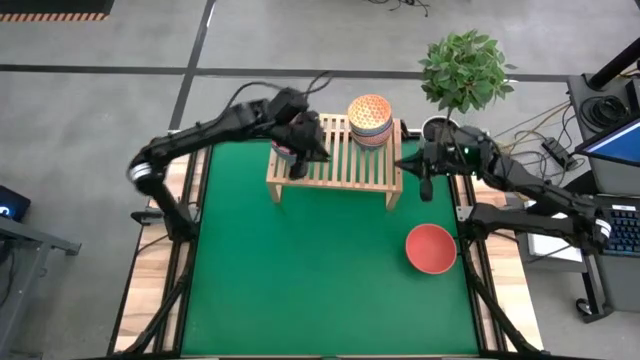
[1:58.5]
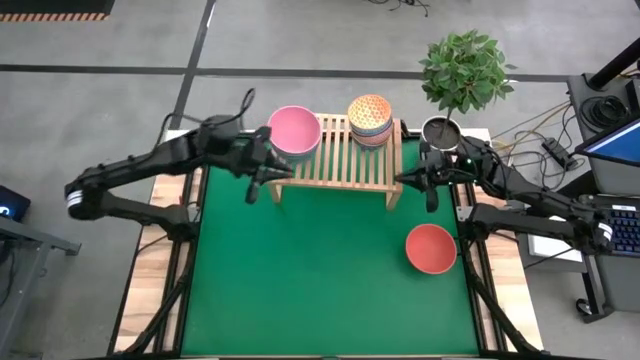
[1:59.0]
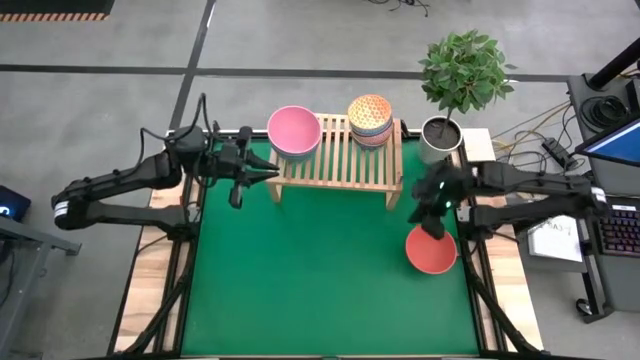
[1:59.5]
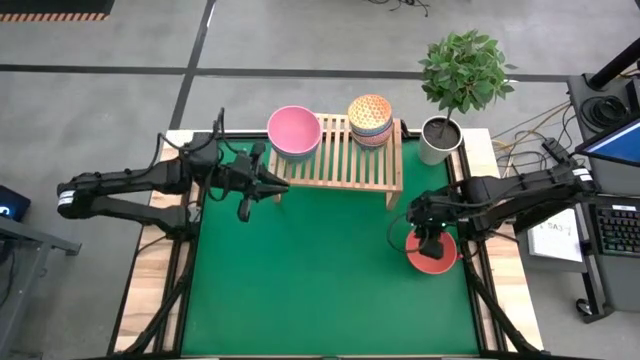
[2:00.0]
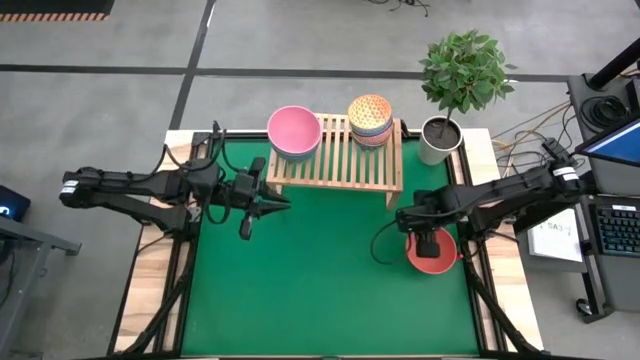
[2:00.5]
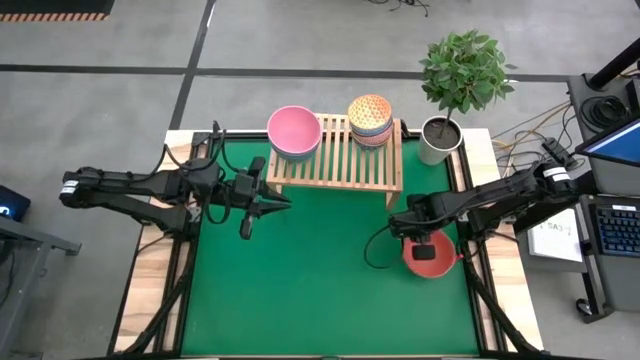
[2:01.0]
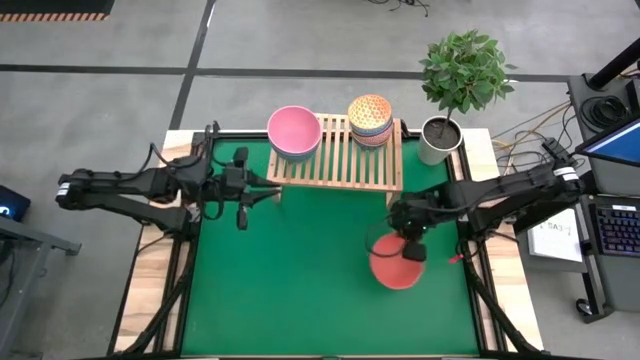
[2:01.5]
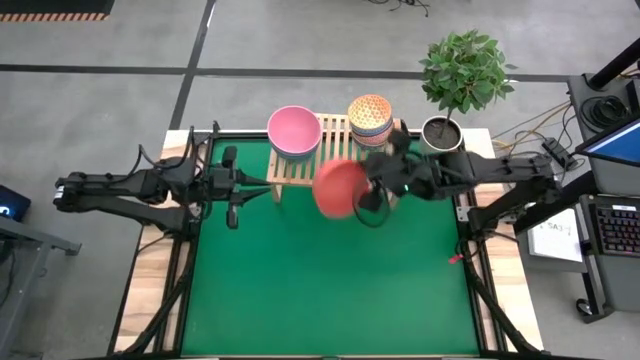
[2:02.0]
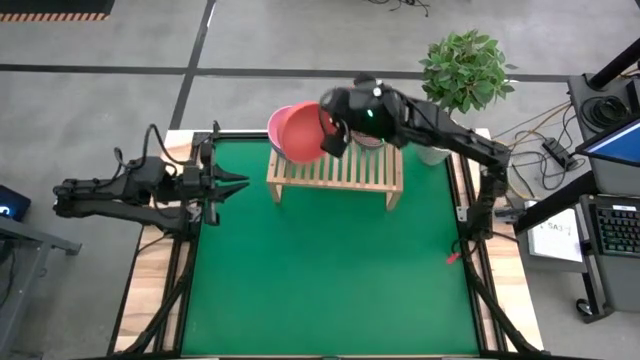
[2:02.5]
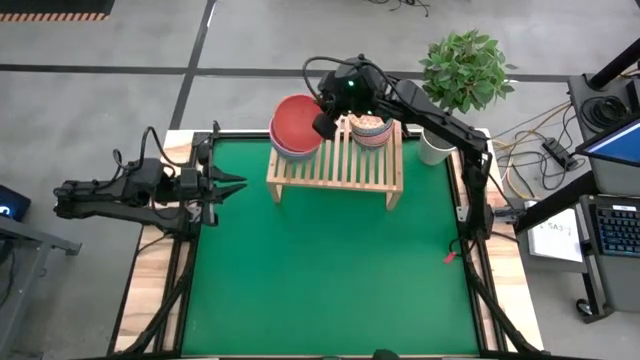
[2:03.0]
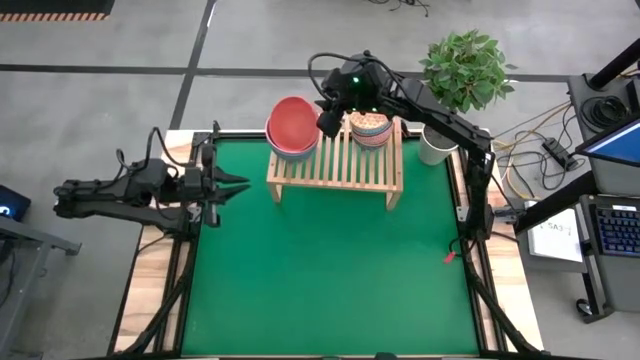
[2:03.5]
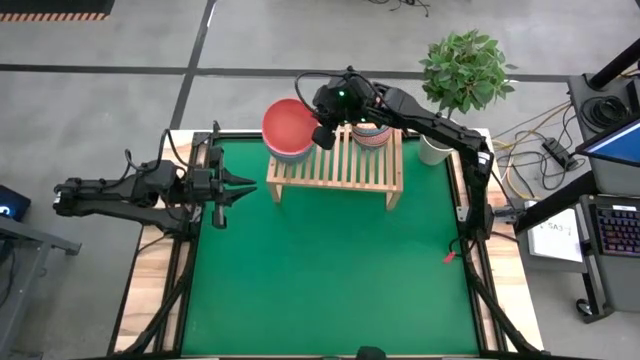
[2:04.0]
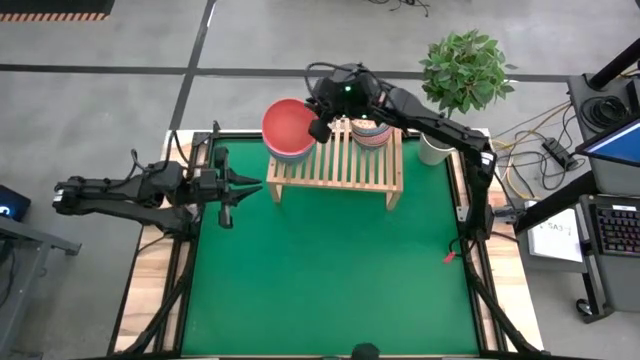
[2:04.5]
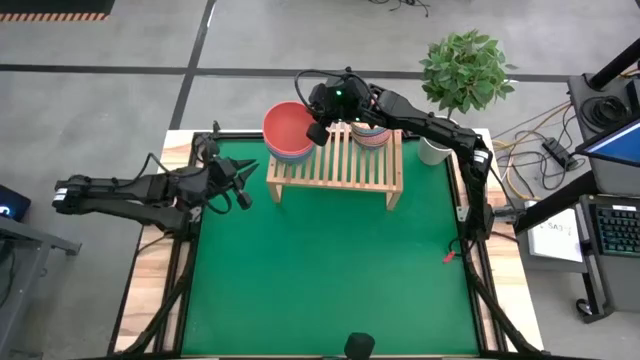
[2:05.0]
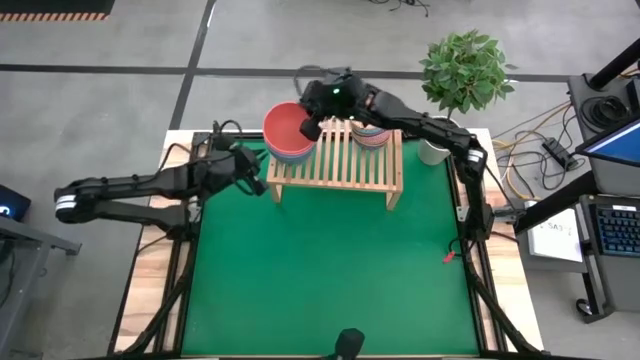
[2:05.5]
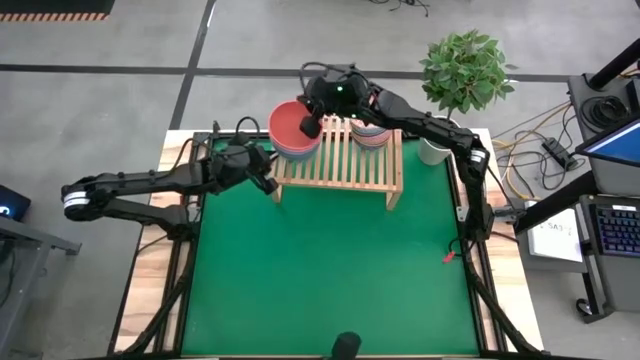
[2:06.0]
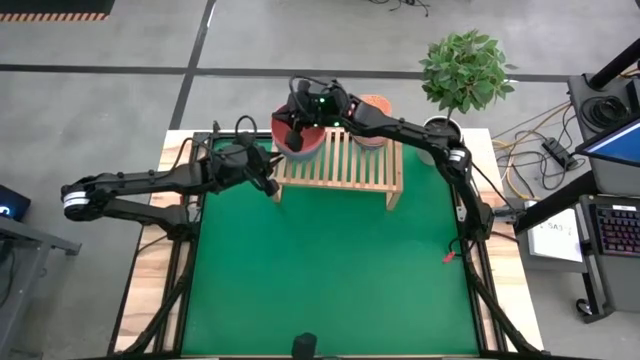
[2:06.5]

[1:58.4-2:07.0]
Task: Place and stack bowls onto a shelf
Stack the orange bowl on top of the pink bowl on the shelf

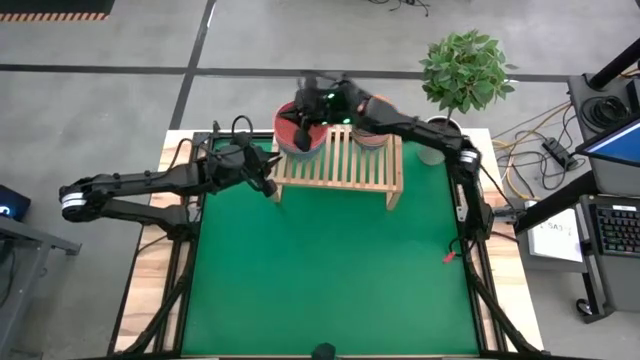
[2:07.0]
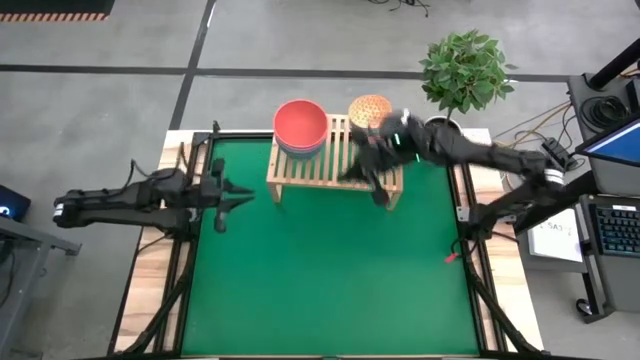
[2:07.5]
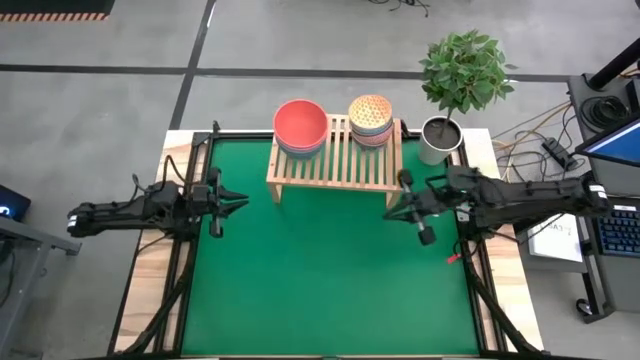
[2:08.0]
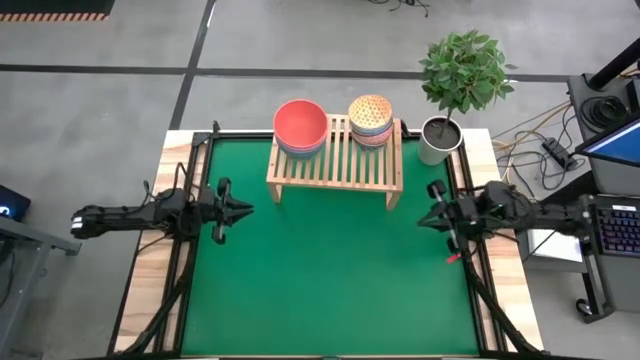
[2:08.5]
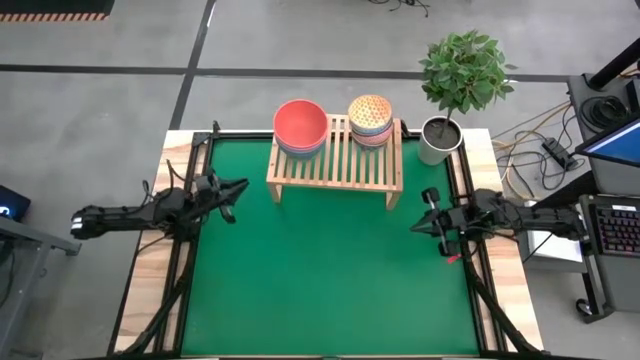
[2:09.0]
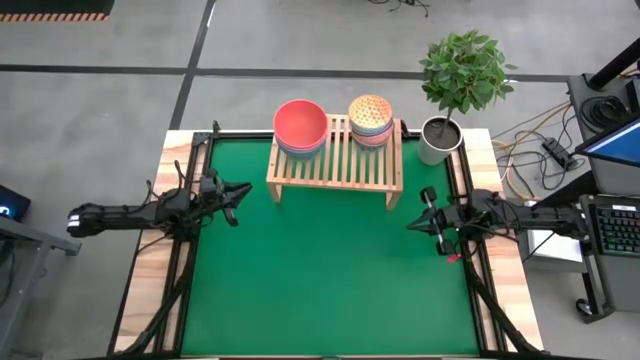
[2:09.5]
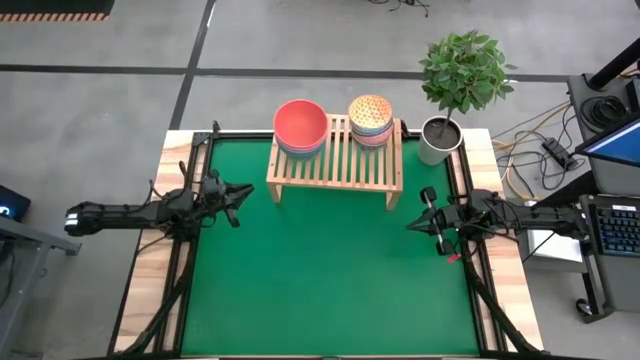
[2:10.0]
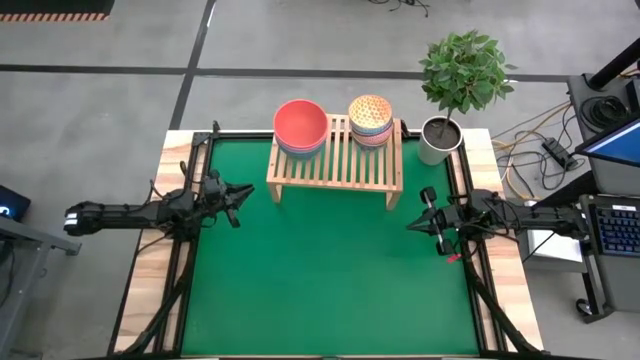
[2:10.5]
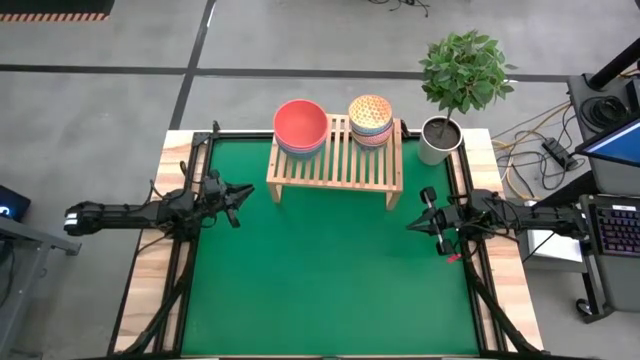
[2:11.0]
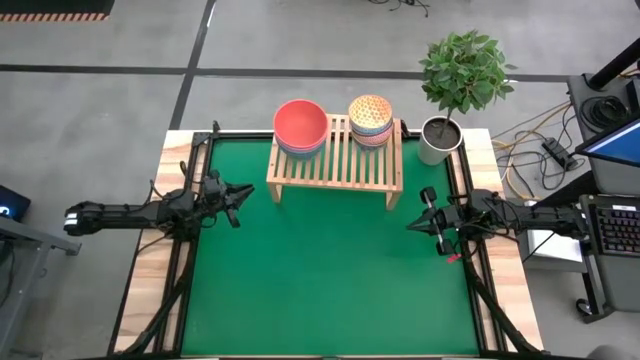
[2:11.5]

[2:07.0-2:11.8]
Return to Home Position

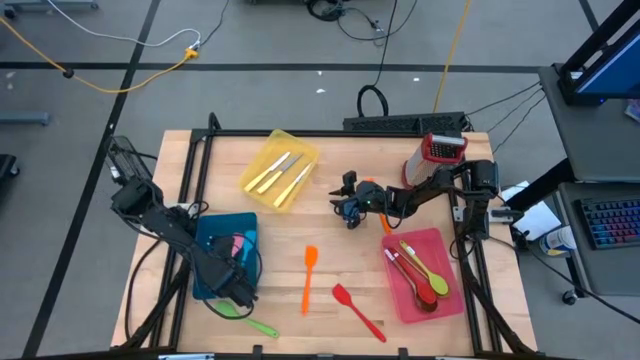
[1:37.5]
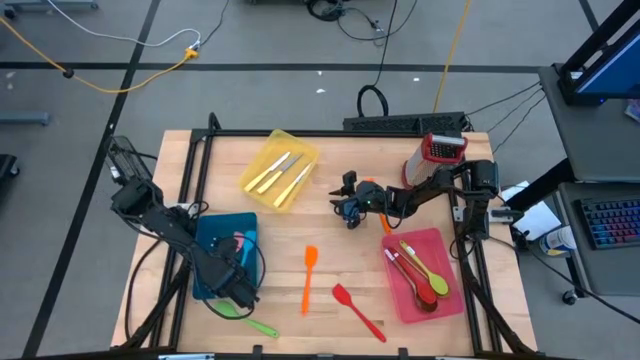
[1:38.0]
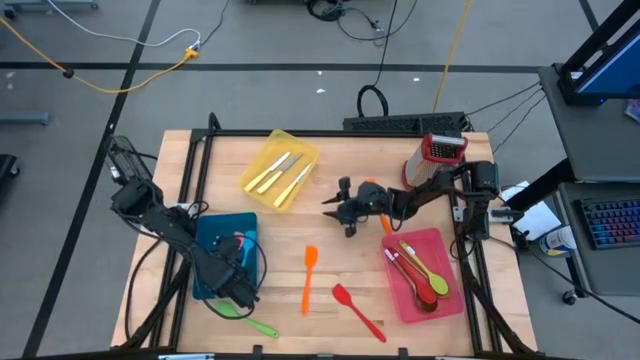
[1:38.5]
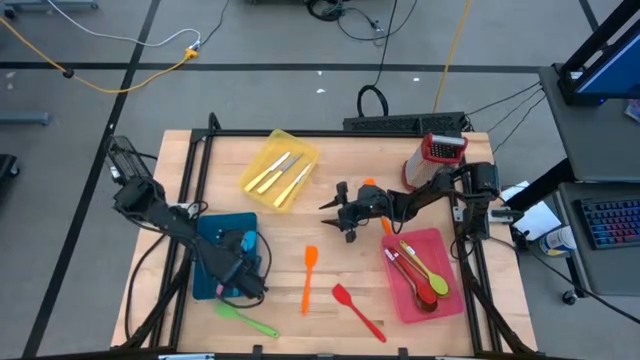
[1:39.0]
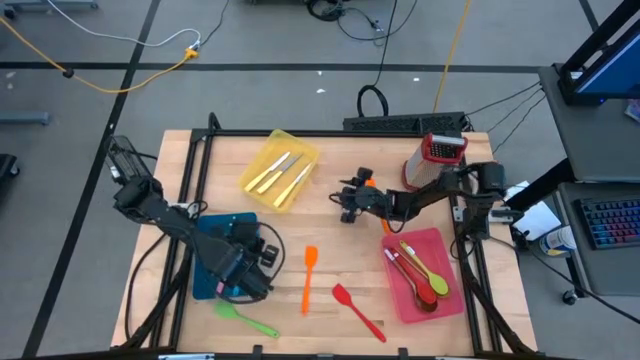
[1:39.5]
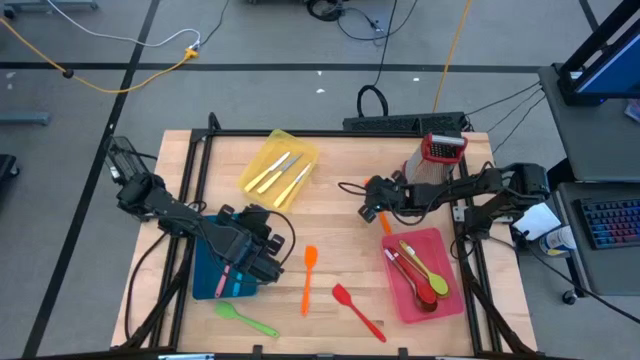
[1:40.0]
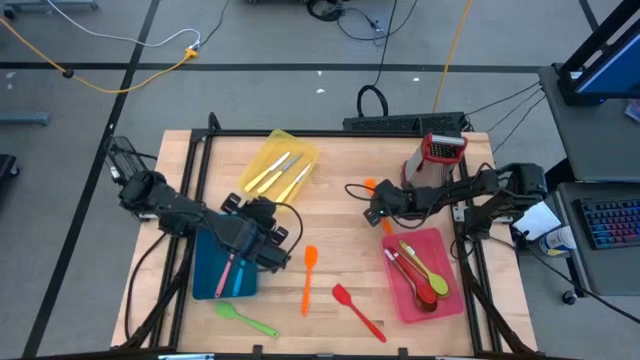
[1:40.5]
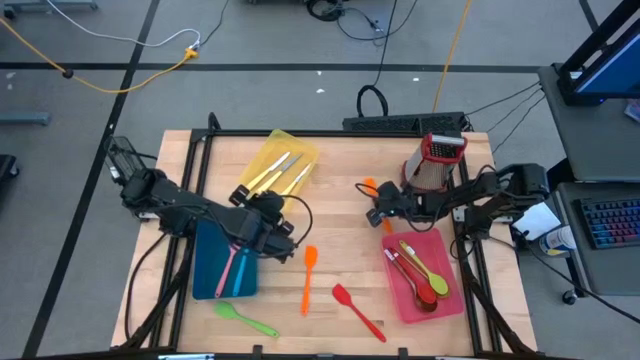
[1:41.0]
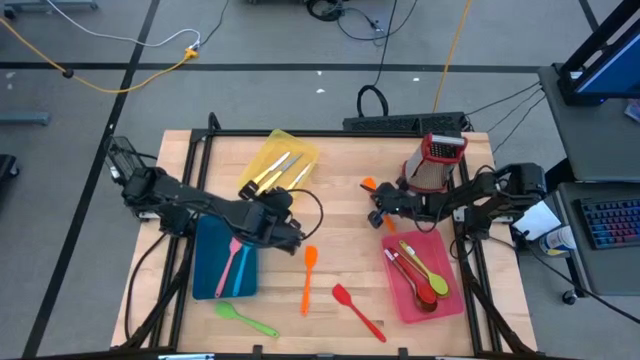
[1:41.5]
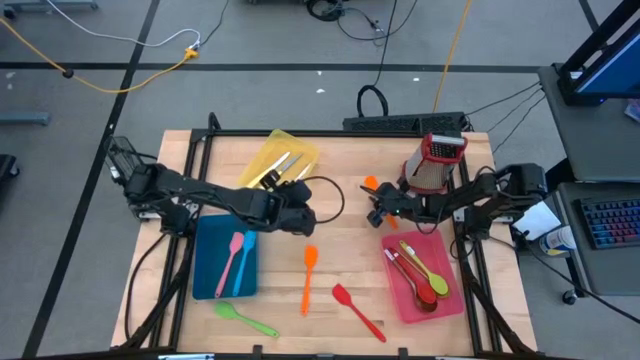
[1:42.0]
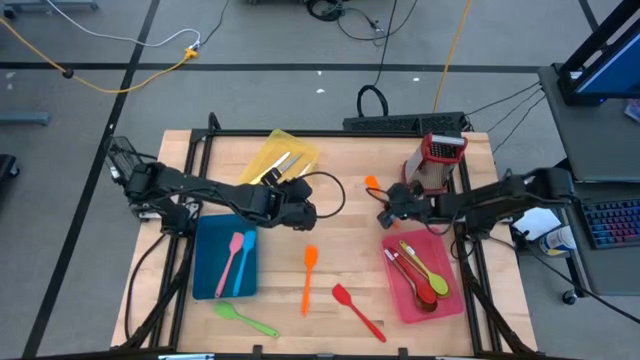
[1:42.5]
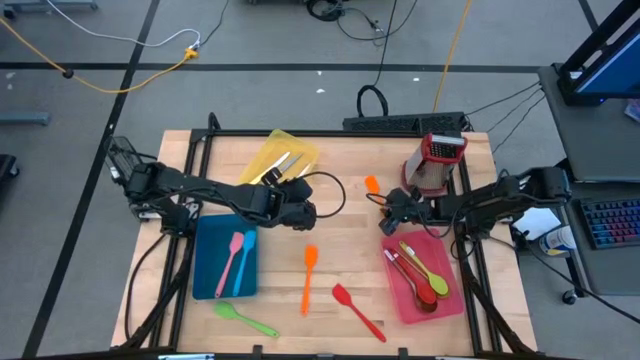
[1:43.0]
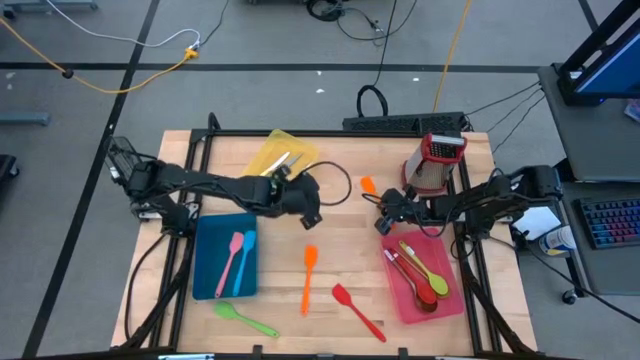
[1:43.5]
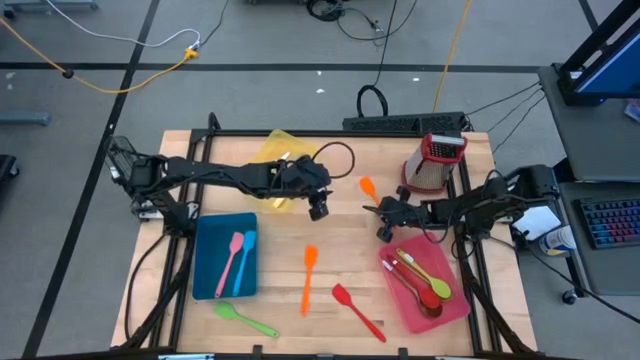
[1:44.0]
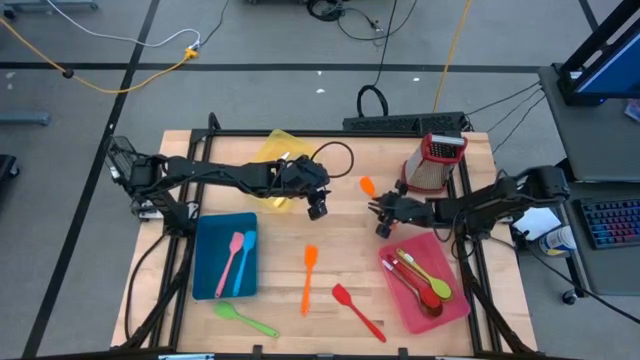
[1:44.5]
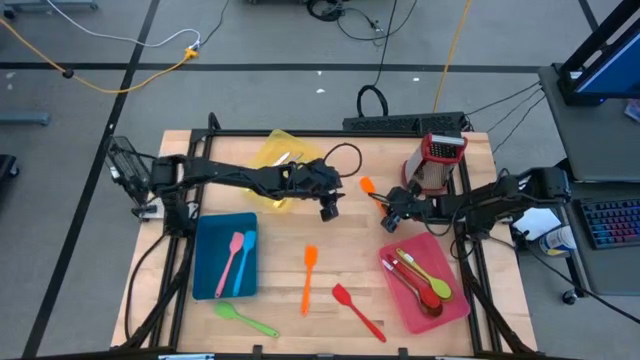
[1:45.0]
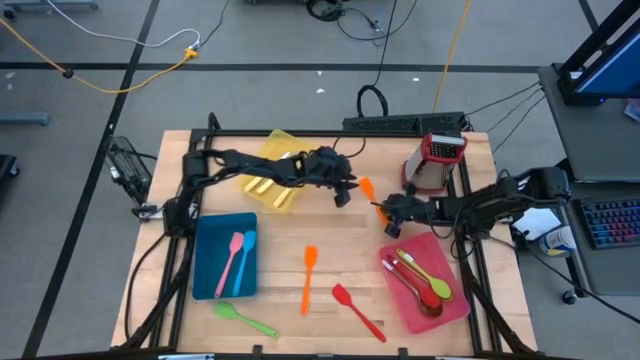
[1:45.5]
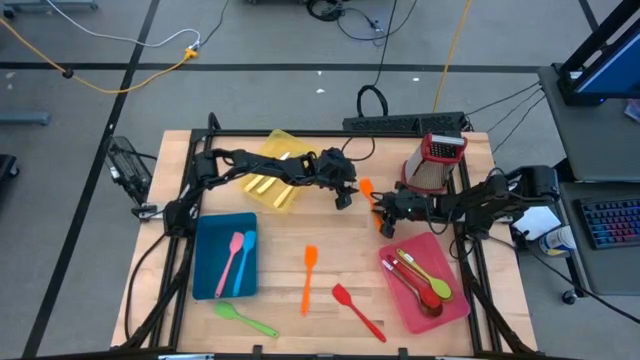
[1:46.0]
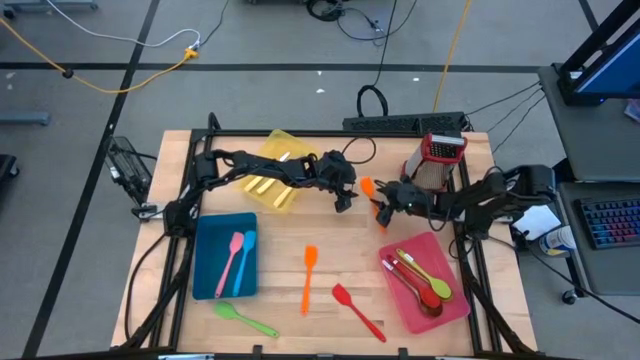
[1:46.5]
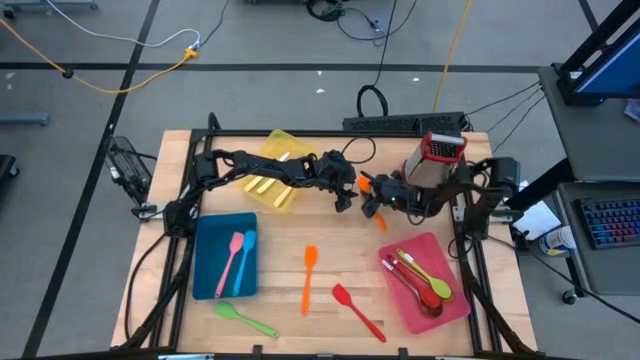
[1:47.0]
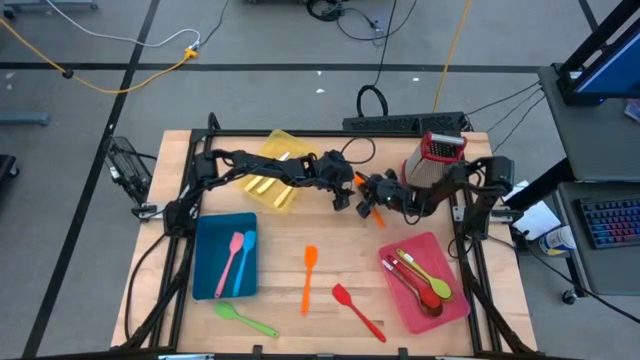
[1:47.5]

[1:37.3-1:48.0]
Task: Pick & Place Kitchen Items
Put the orange spatula into the blue bin
